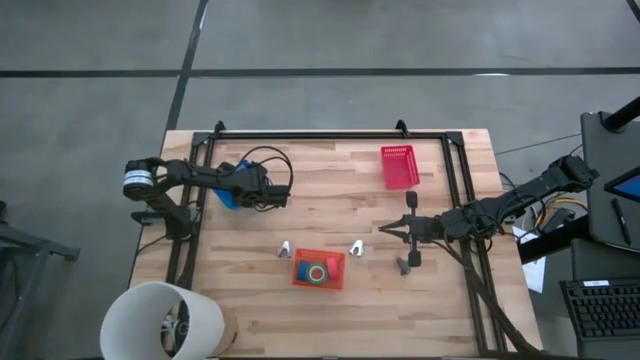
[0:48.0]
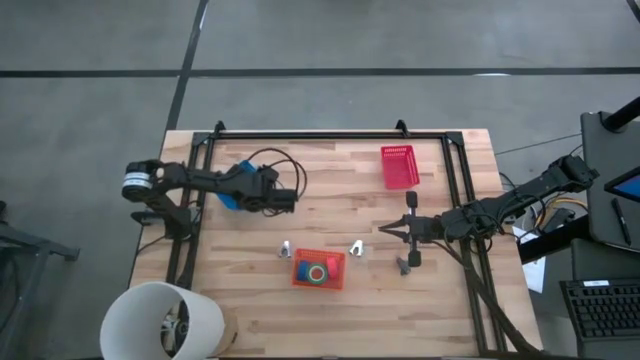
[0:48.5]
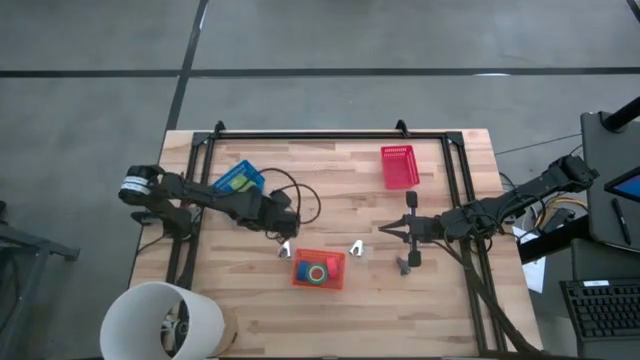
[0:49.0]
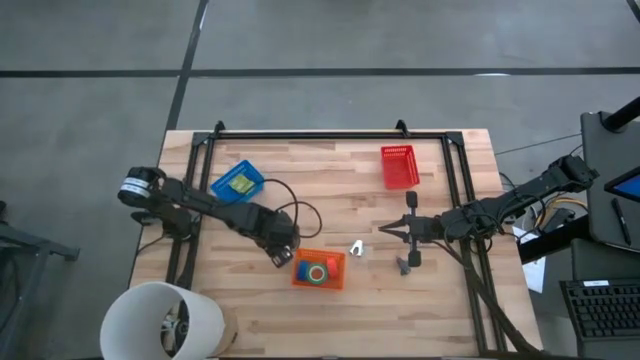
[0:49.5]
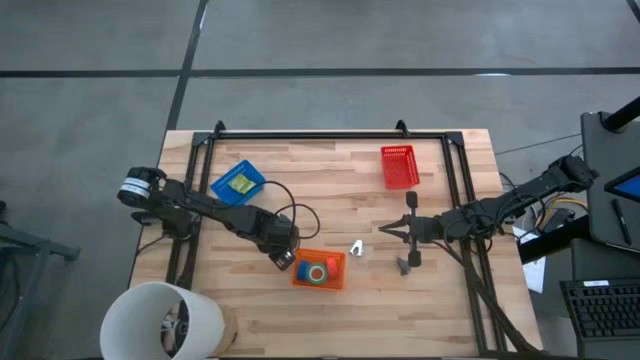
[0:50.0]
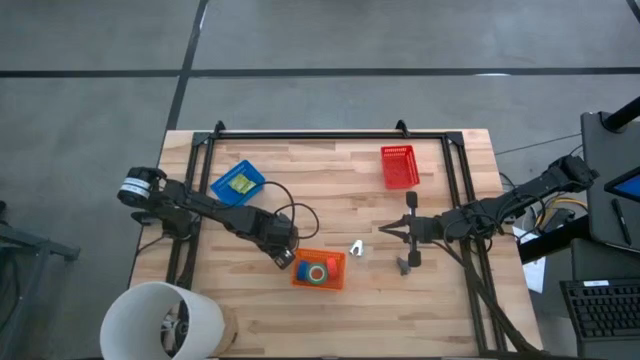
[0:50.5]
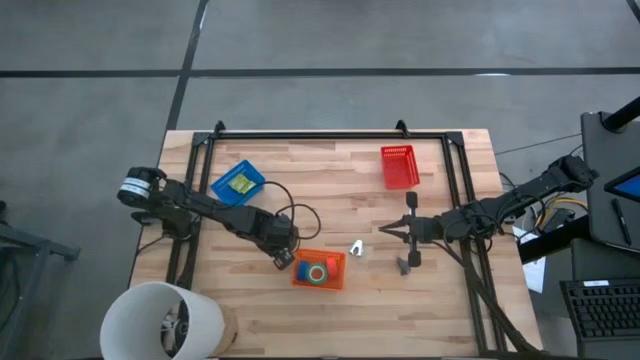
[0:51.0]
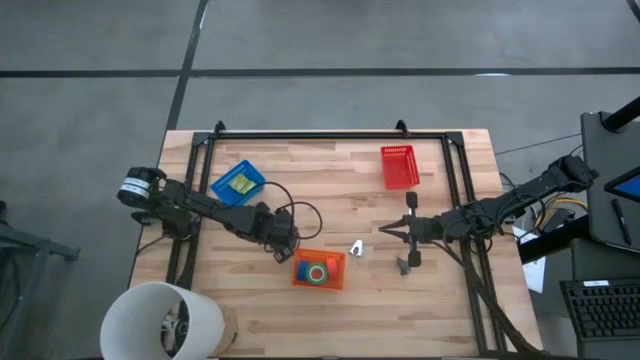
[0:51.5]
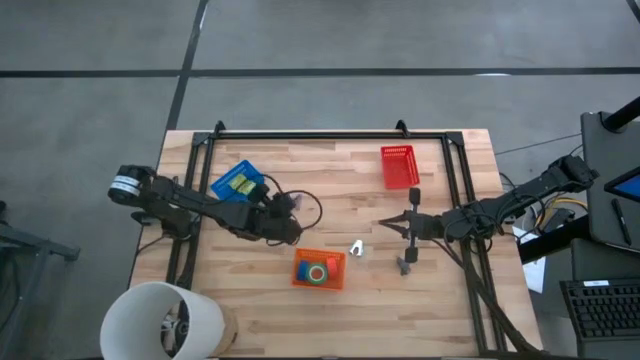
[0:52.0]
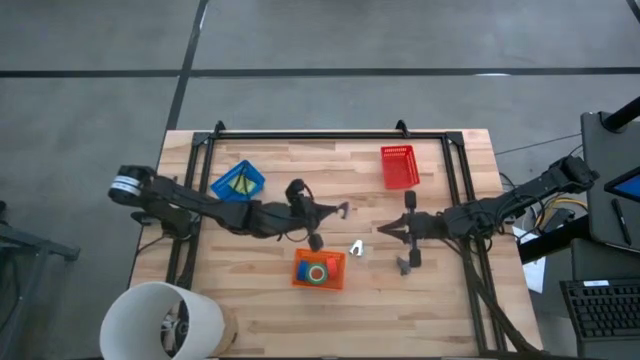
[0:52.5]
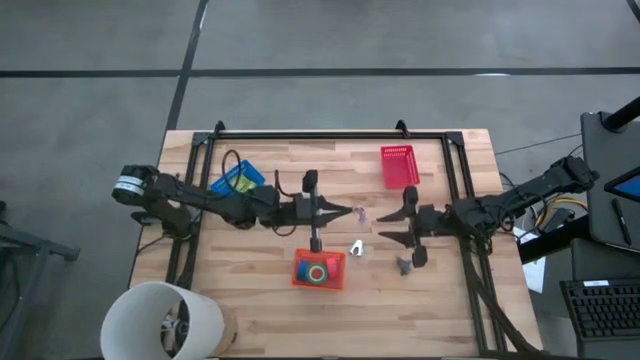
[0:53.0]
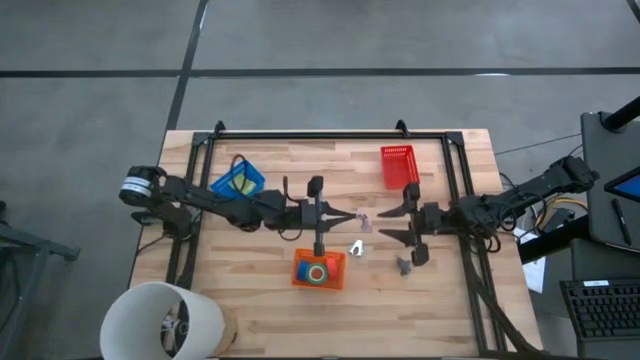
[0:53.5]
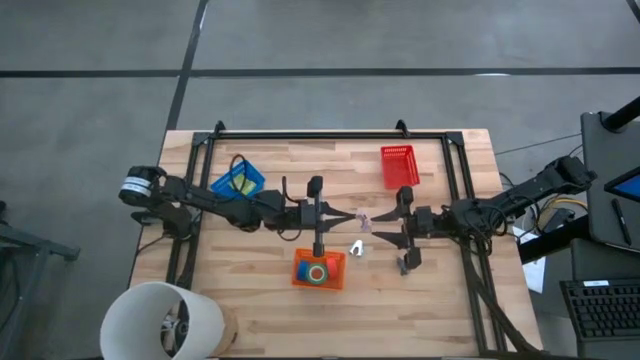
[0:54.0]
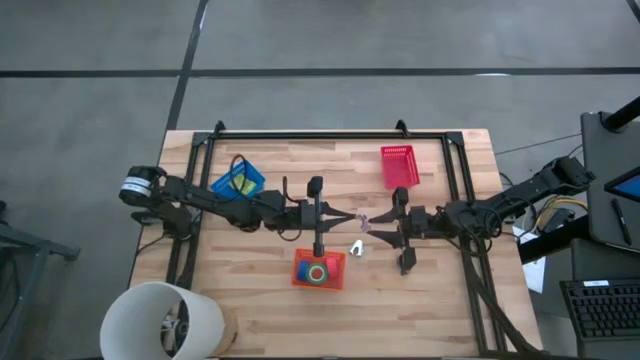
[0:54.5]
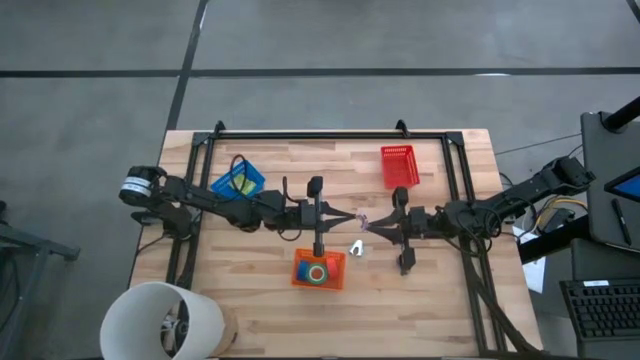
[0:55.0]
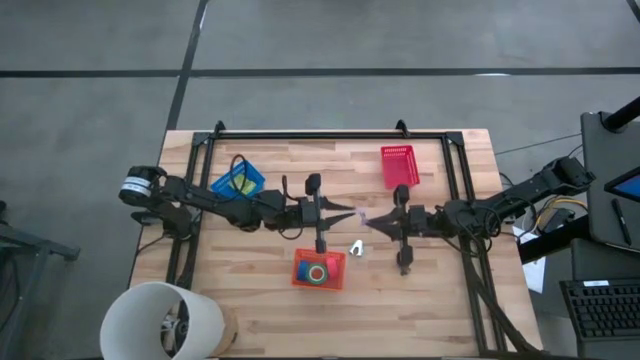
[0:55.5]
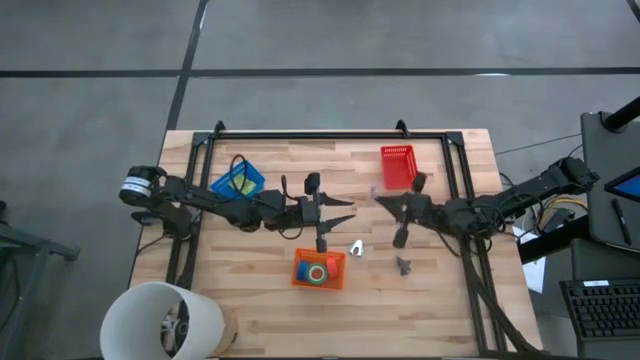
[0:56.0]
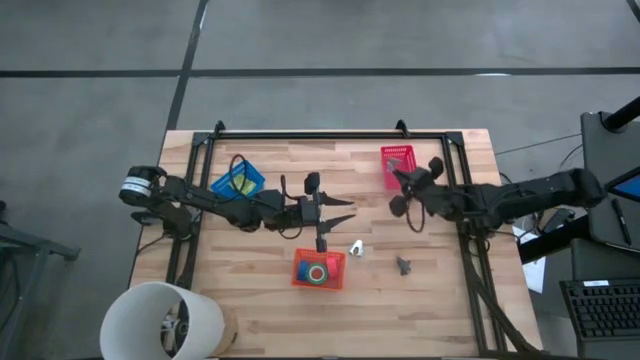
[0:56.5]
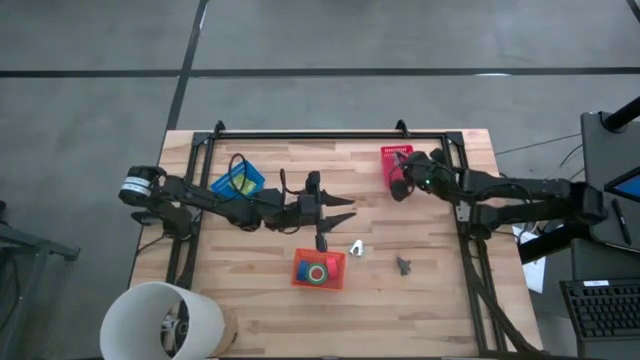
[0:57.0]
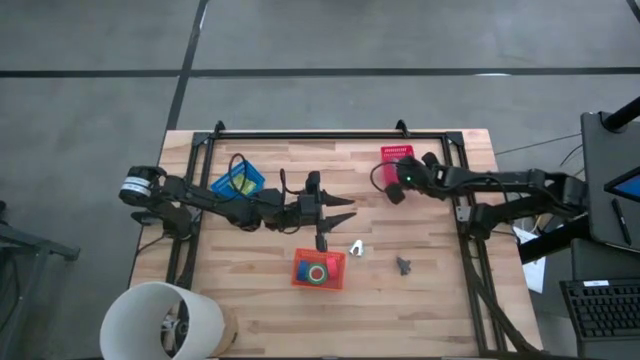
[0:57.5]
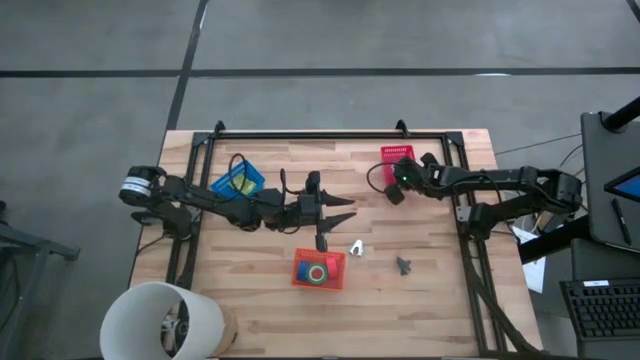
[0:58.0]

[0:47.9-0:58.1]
Task: Pick and place Stapler, Stapler remover, tape
Put the purple staple remover into the red bin

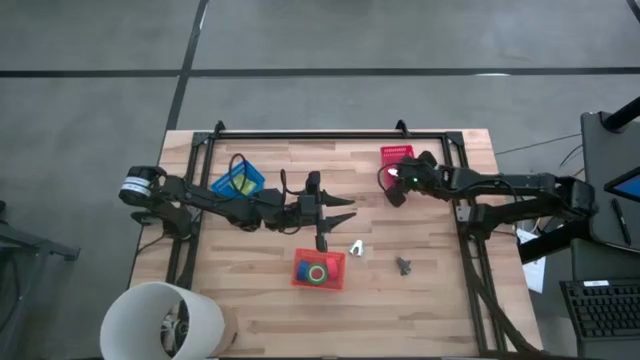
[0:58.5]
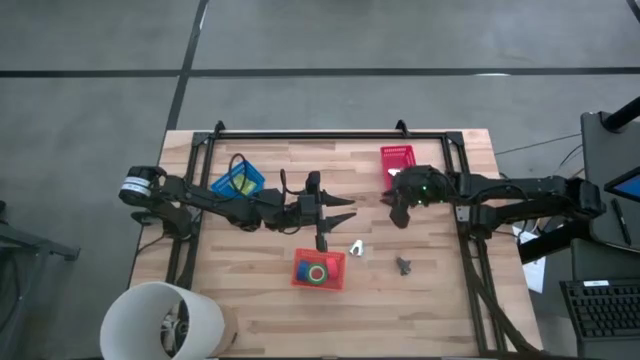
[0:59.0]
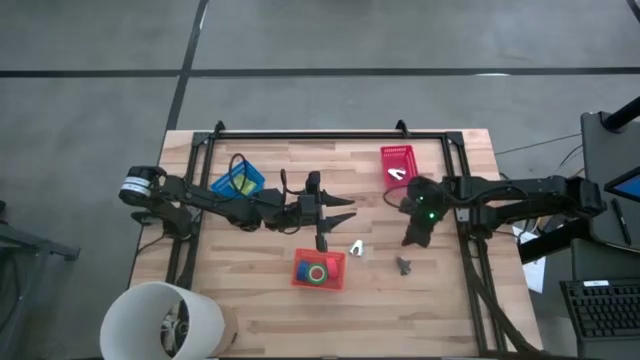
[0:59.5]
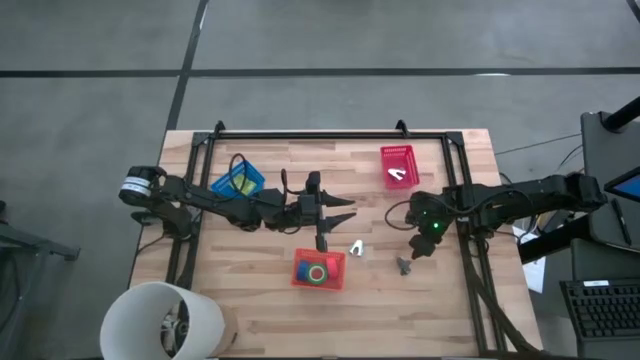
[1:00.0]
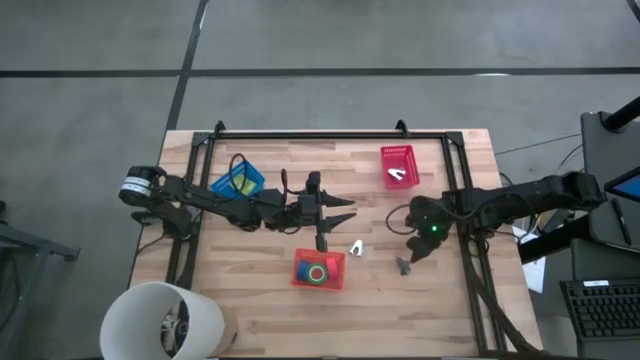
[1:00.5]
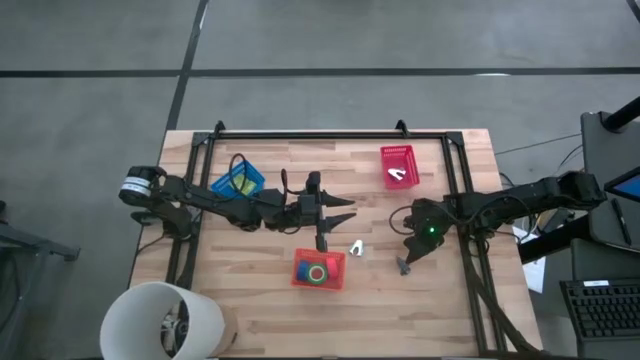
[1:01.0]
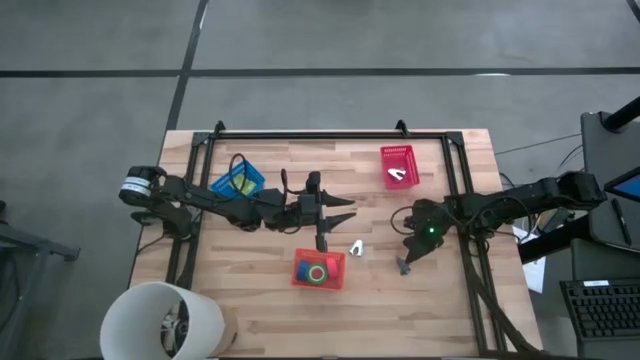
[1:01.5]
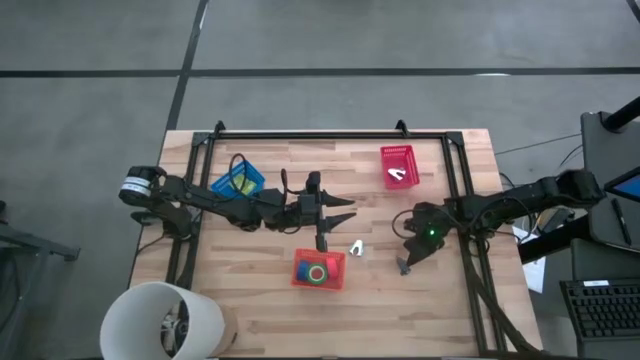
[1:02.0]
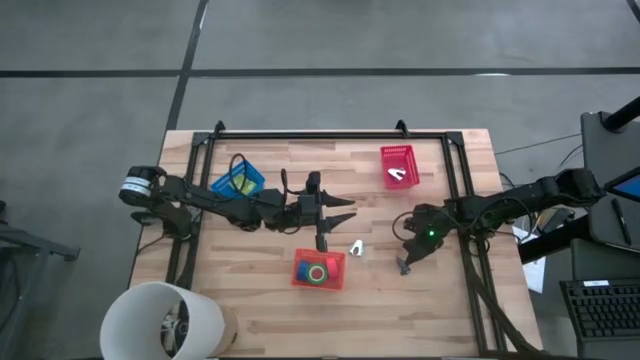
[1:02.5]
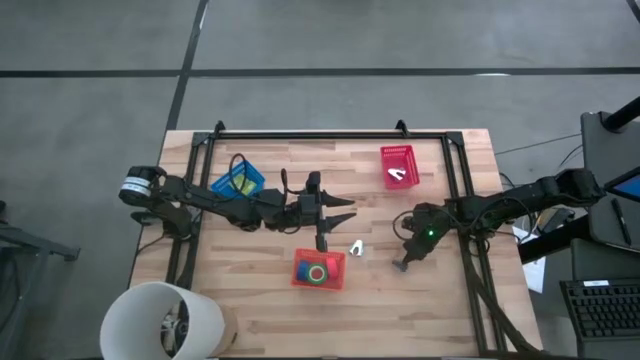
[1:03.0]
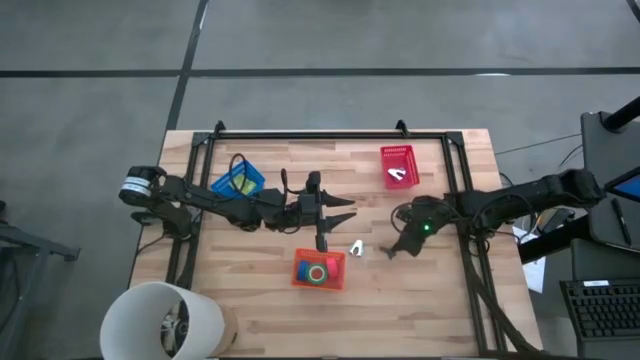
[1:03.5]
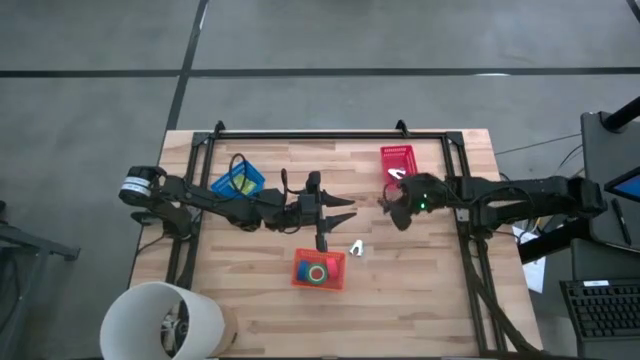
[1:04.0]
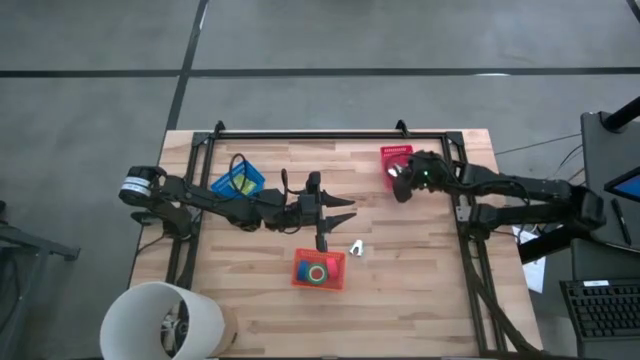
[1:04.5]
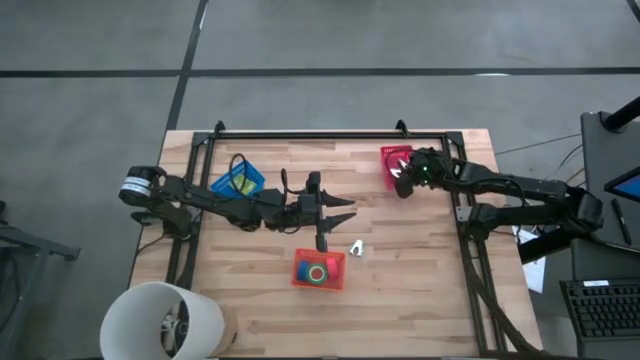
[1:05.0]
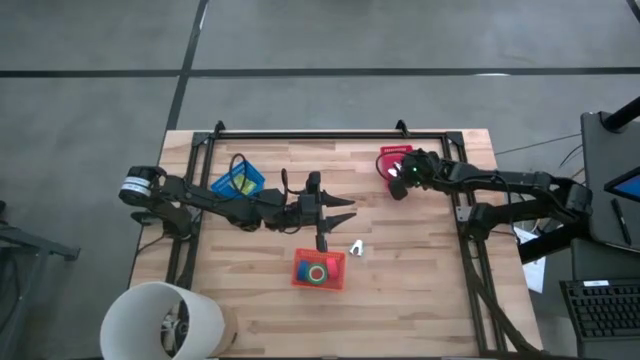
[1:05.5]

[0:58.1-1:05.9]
Put the black staple remover into the red bin

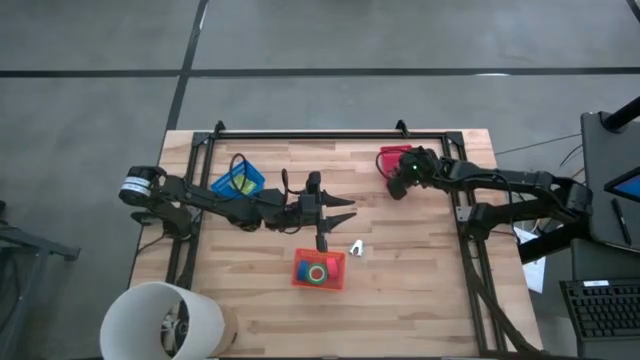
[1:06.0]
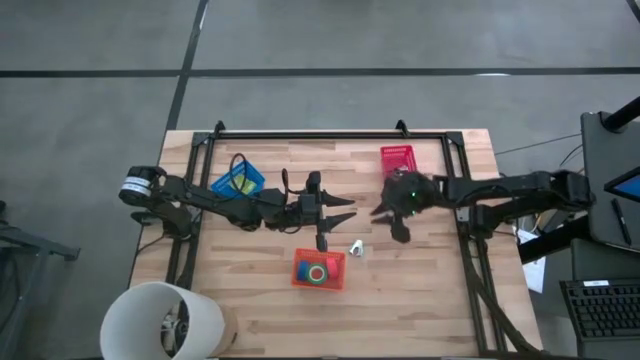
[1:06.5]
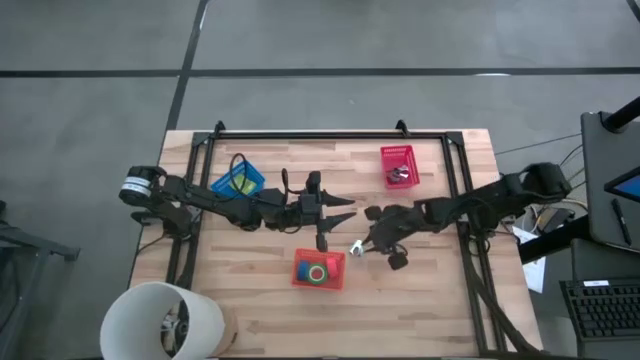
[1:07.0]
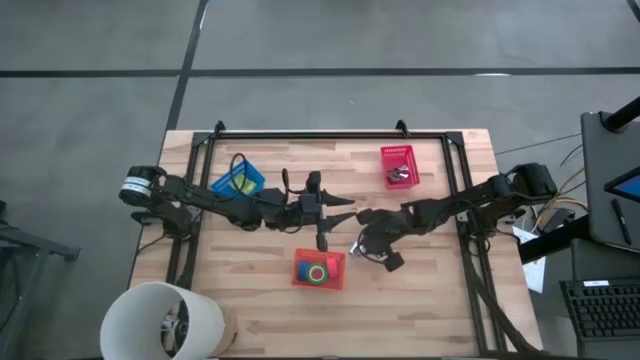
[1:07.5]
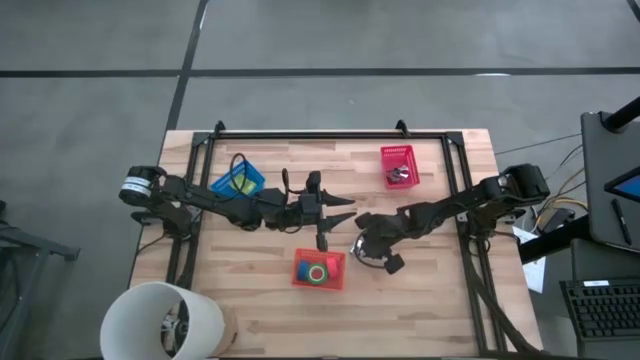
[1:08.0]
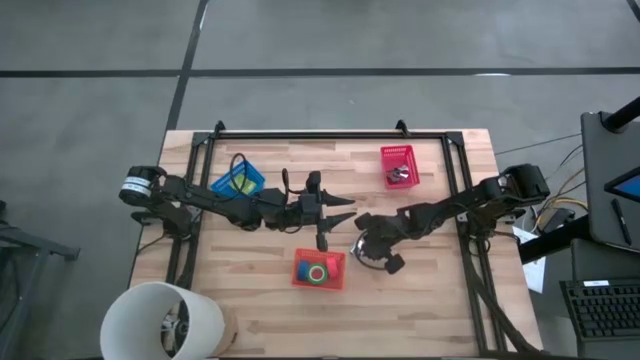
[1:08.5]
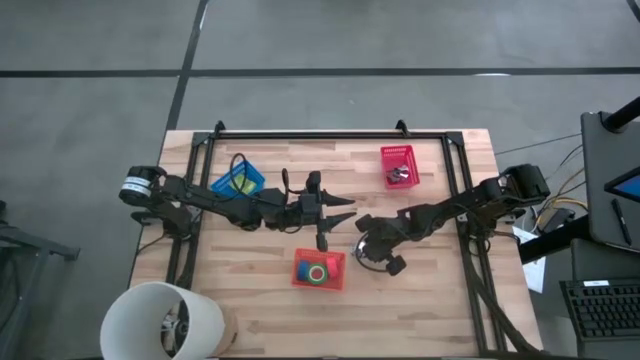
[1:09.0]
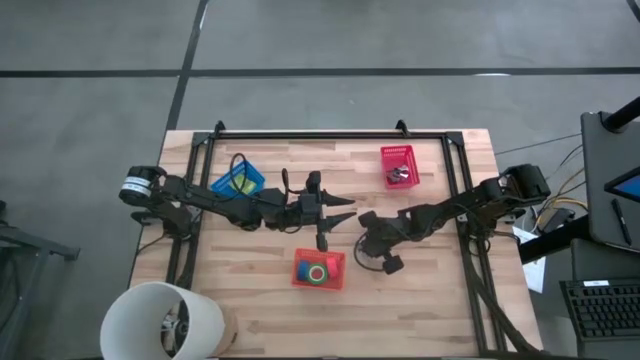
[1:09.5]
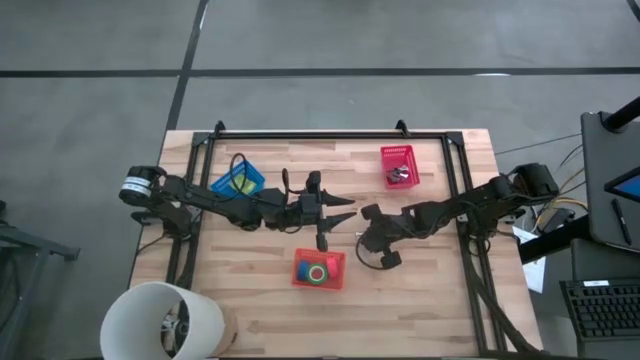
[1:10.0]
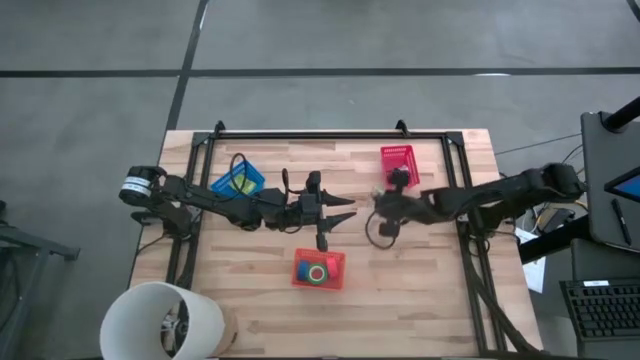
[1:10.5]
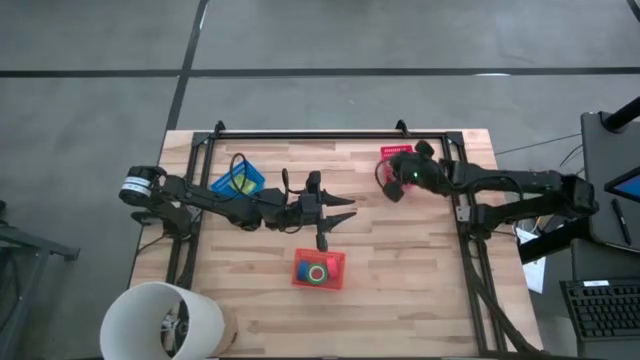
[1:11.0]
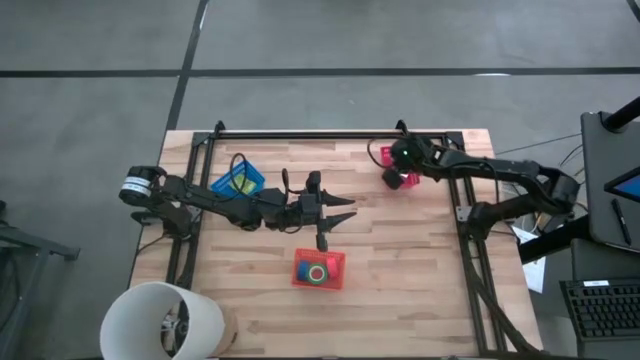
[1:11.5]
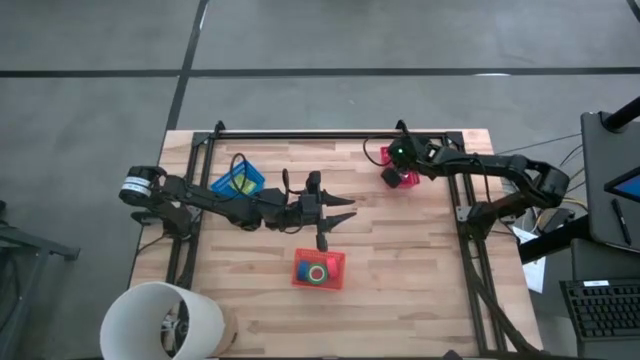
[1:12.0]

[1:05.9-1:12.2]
Put the light blue staple remover into the red bin
